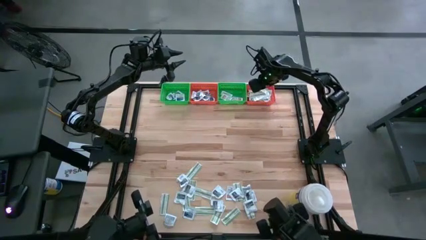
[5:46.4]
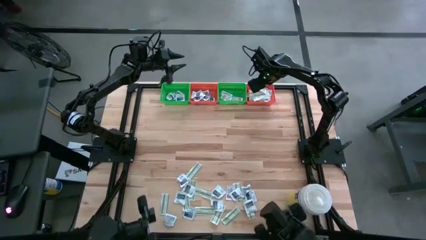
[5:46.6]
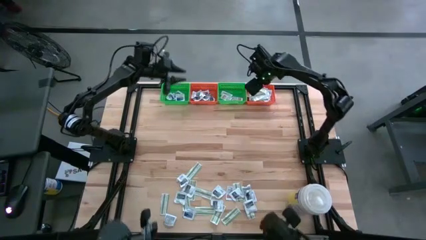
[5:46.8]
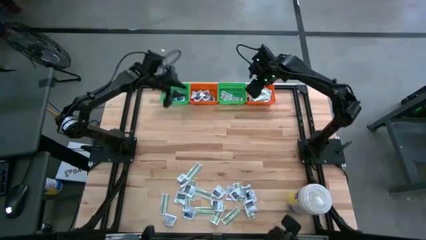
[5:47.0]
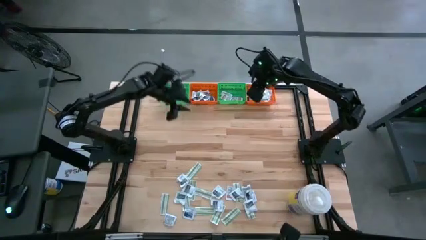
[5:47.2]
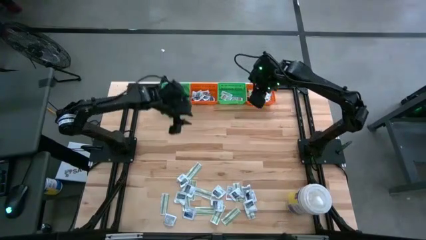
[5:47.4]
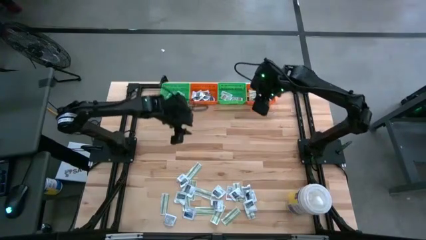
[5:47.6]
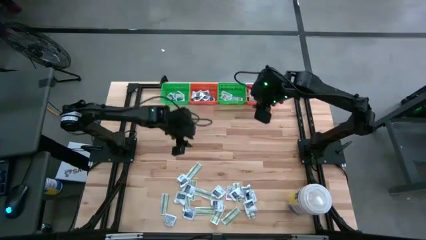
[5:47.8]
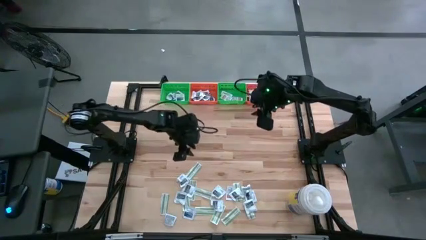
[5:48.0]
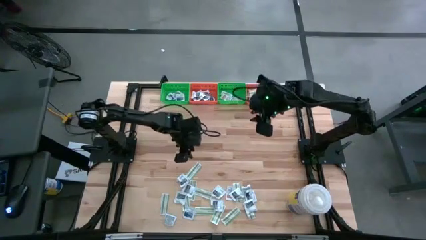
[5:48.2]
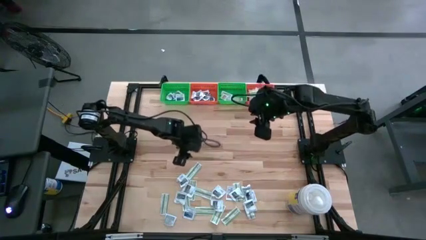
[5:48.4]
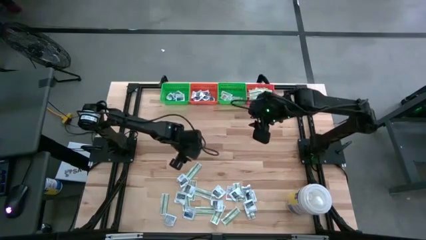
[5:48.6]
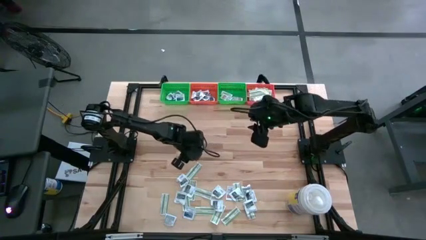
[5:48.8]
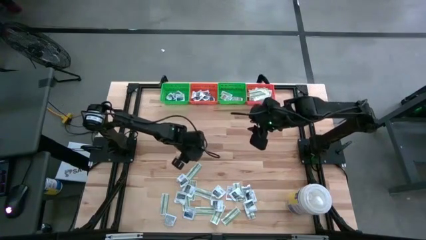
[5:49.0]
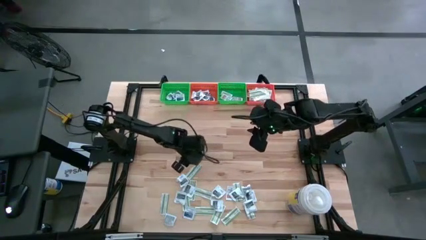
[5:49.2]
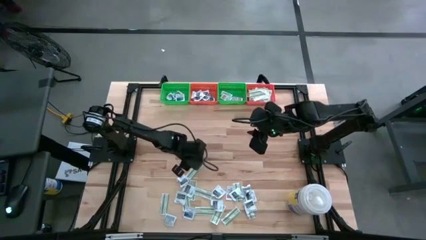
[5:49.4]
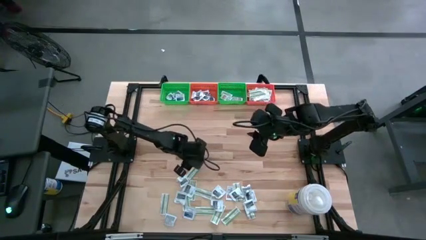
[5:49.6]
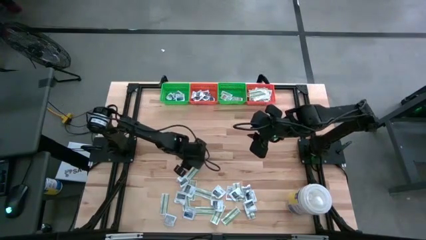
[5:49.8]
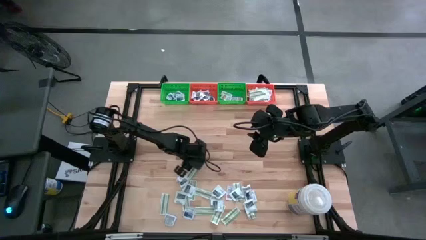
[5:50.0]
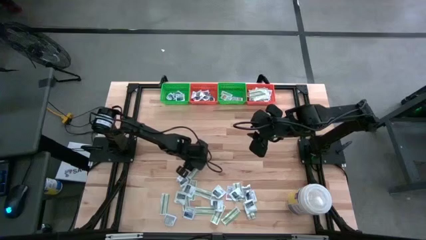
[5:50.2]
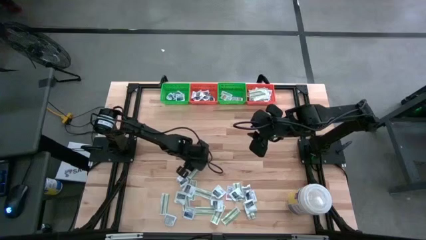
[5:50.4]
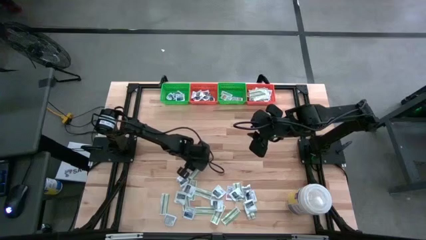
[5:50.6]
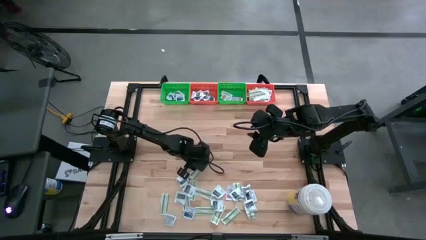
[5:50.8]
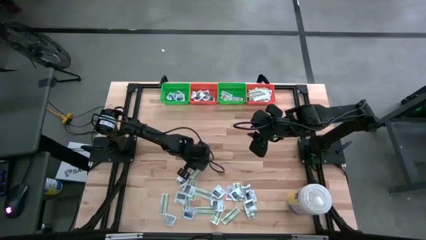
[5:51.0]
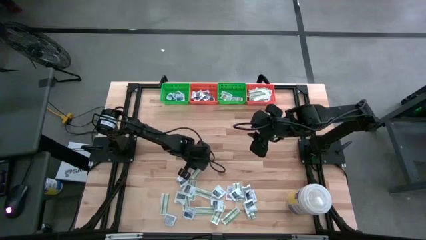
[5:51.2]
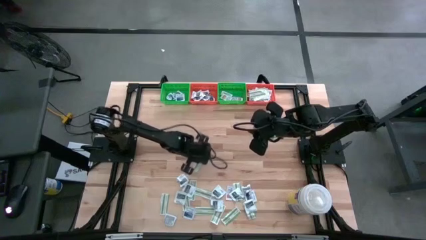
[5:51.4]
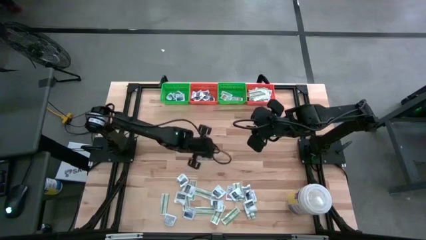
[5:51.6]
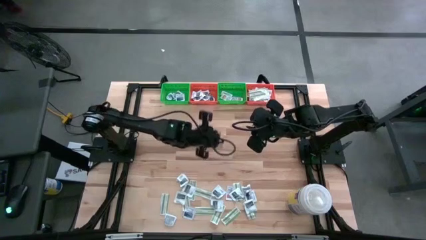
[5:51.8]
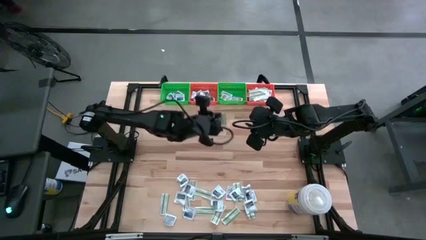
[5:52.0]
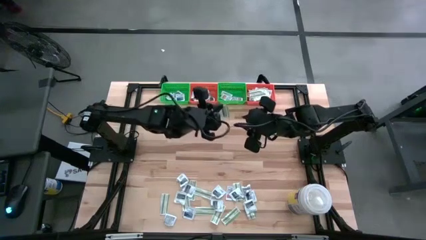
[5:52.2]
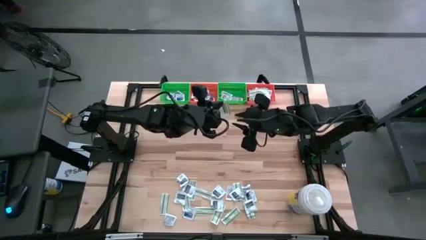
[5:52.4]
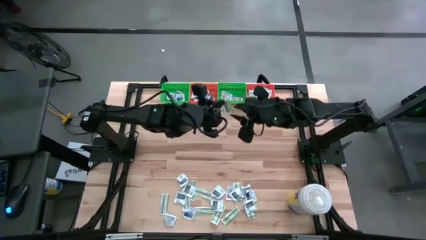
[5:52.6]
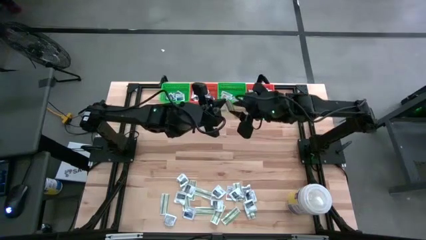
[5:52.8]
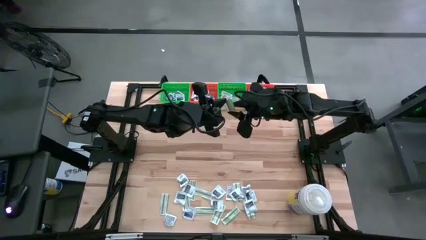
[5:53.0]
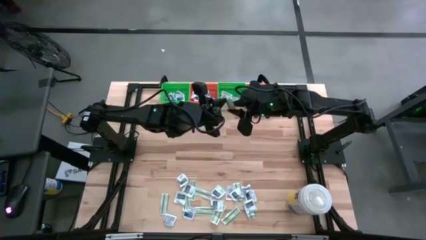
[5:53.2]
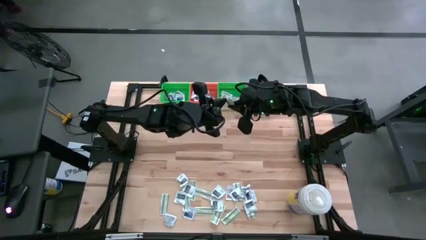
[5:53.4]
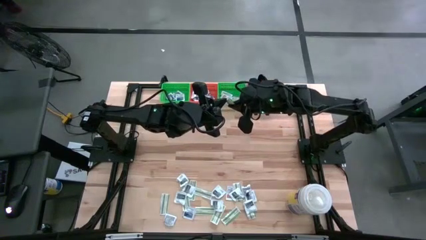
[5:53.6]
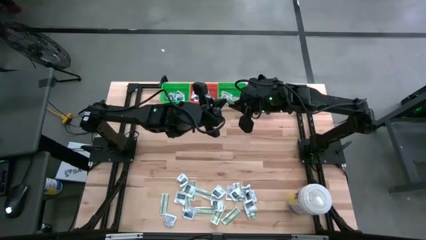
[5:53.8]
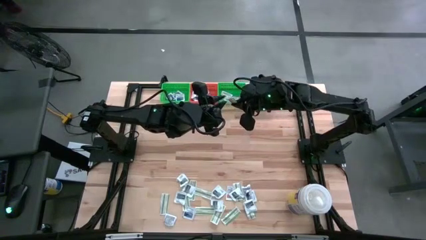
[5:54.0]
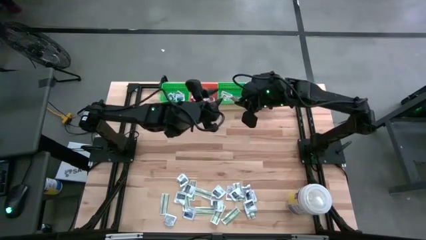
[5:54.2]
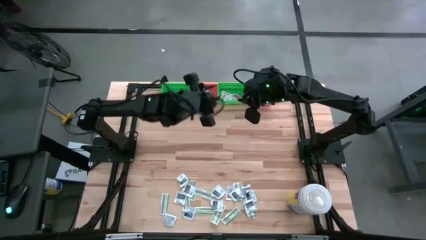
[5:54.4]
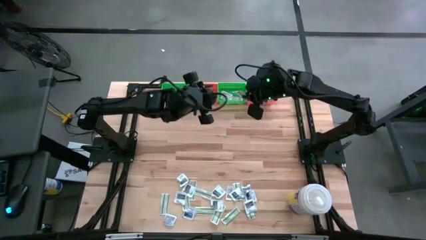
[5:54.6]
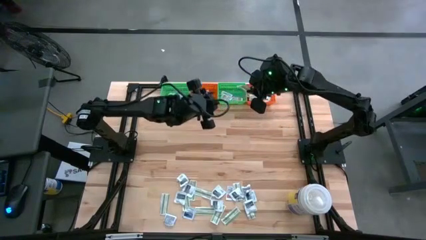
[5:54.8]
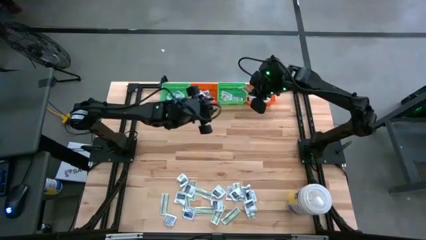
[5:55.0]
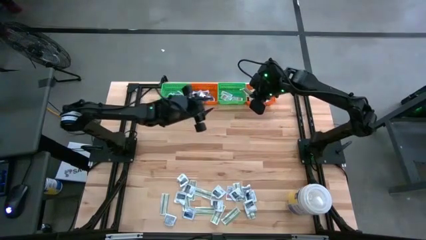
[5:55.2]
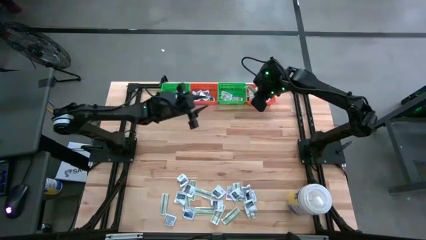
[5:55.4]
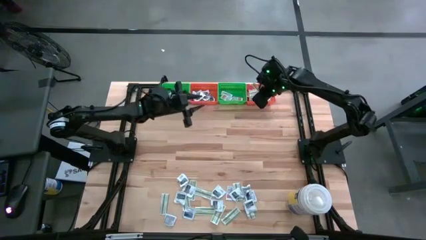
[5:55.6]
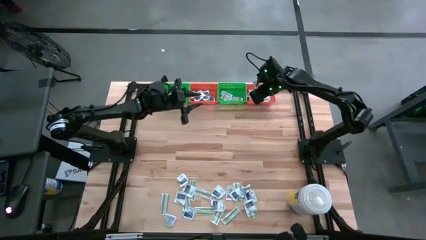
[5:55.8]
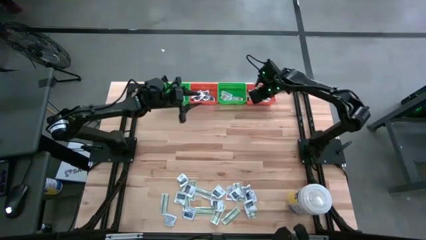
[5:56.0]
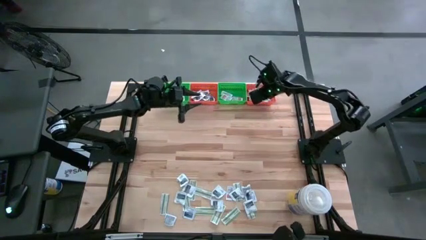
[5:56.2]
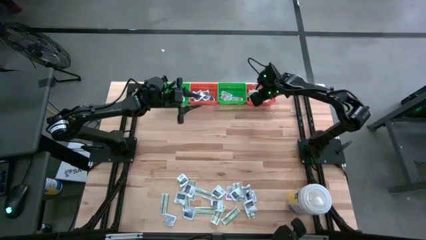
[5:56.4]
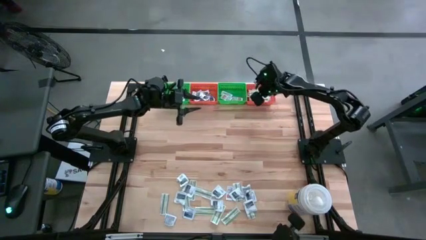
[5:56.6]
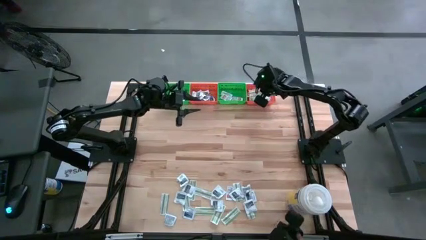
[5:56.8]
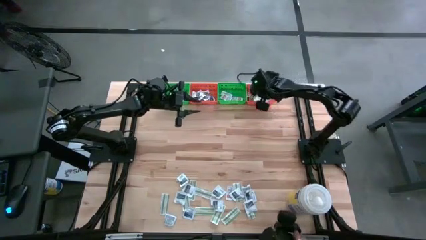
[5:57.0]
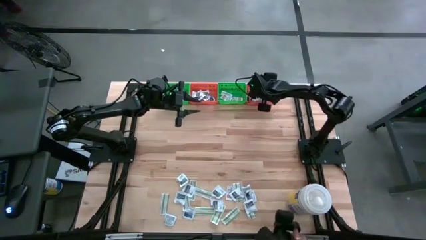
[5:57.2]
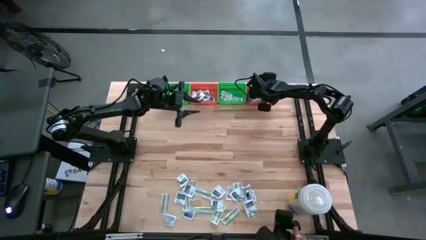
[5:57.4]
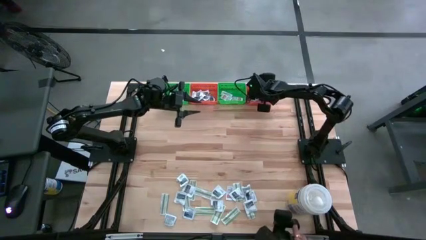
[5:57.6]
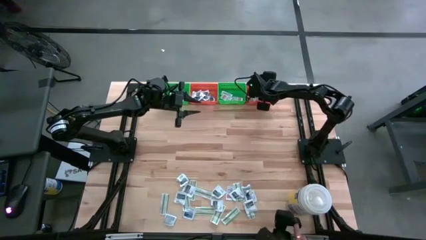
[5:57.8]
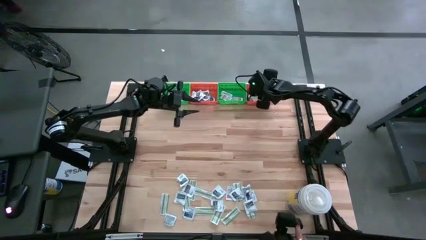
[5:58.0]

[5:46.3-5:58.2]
Task: Pick & Place First Aid Supplies
Put the green bandage pack in the right orange bin

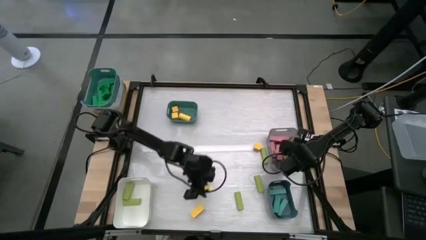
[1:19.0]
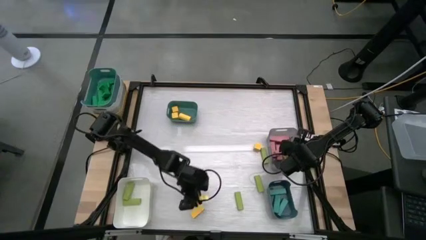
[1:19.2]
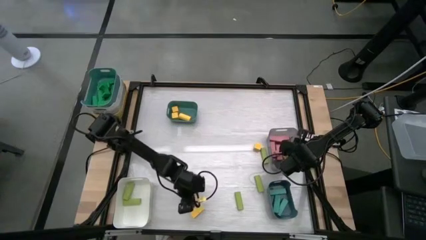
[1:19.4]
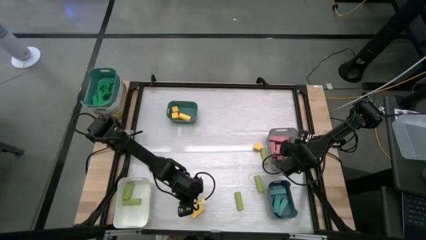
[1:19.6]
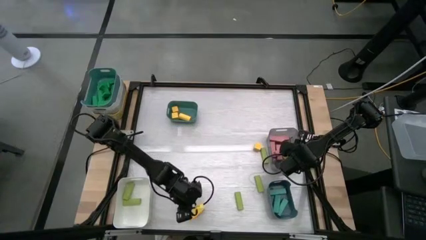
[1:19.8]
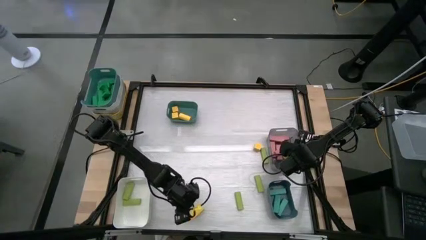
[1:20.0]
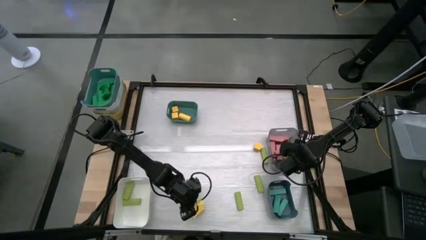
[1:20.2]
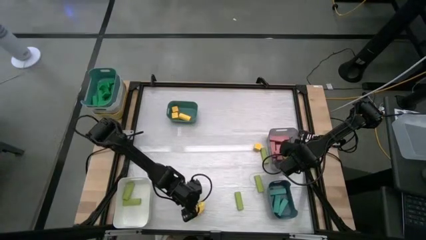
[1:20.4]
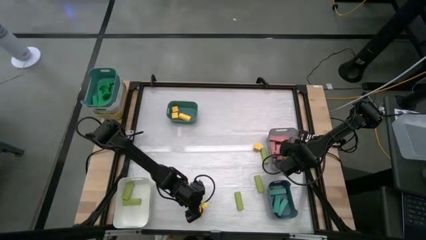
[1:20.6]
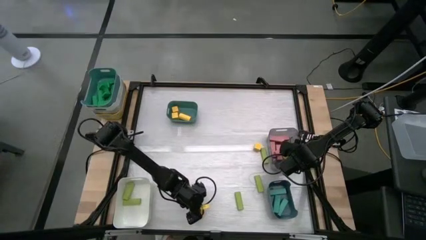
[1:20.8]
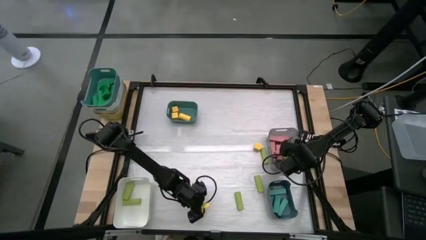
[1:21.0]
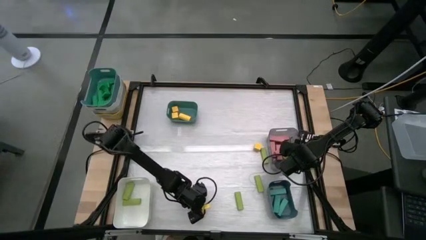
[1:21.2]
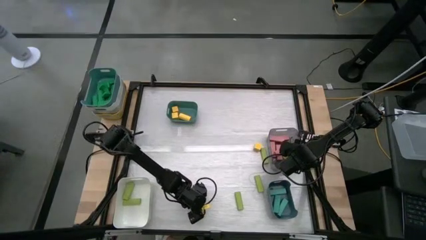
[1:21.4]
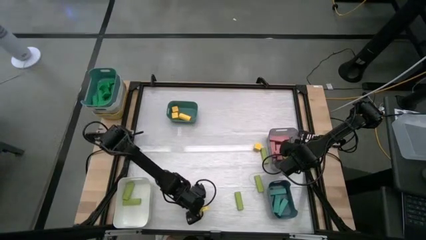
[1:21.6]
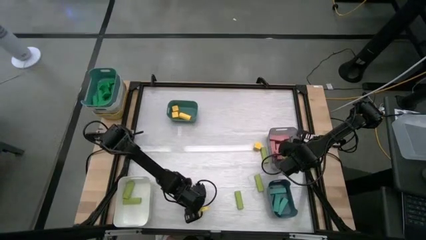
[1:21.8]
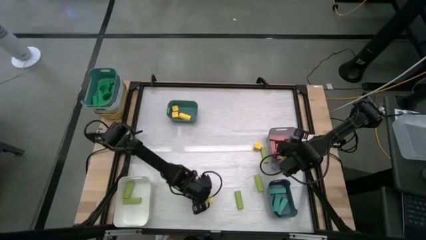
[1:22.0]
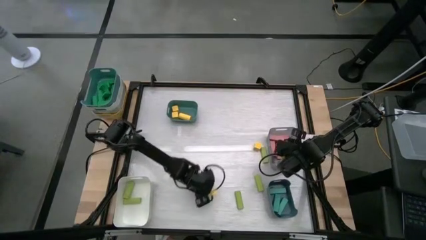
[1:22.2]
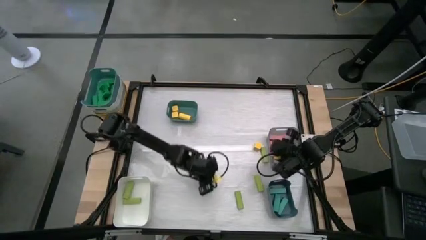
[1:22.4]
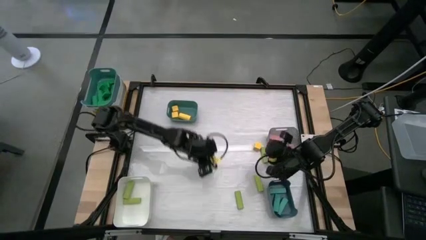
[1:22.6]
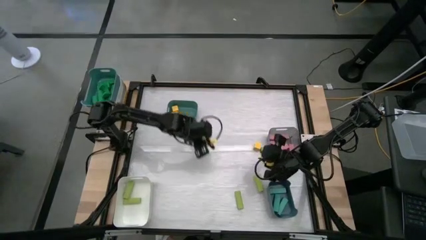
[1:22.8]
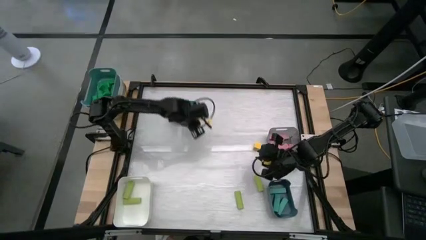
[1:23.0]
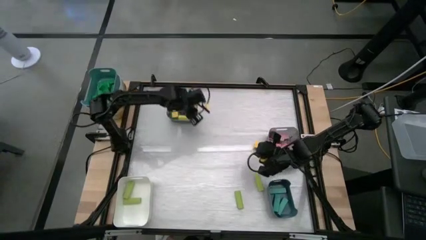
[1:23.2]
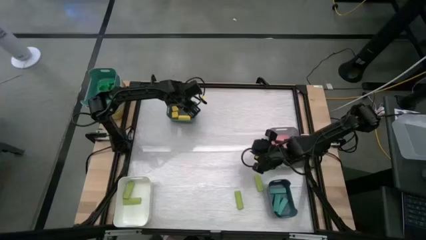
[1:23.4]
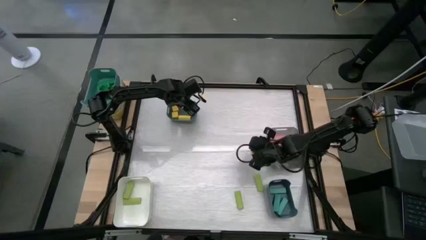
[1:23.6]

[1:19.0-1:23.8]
Task: Sort blocks
Put the yellow block into the green bin
